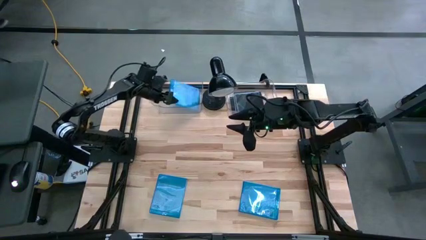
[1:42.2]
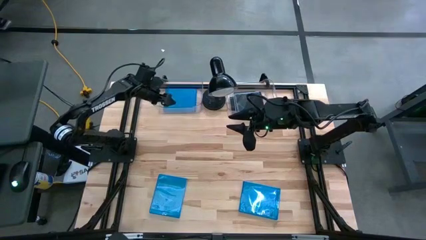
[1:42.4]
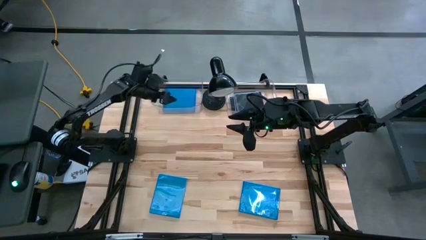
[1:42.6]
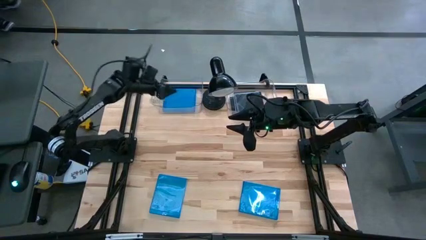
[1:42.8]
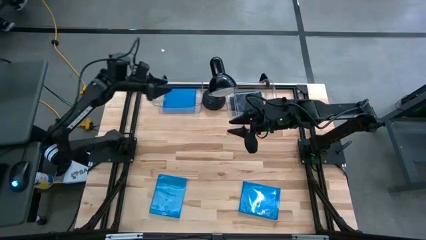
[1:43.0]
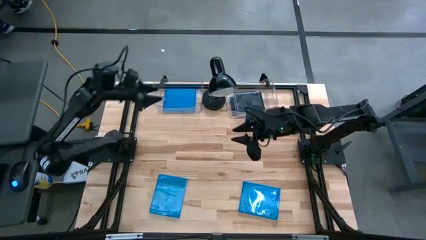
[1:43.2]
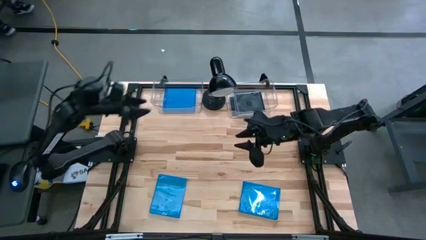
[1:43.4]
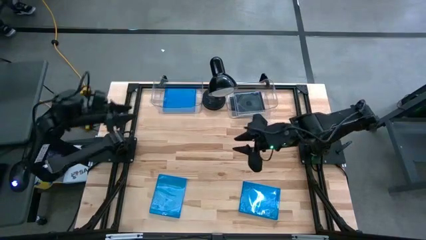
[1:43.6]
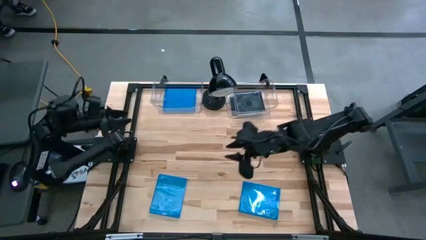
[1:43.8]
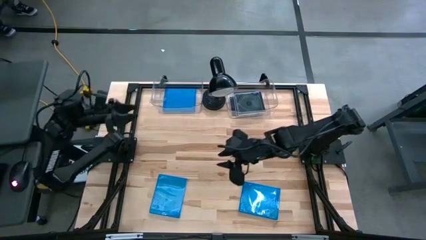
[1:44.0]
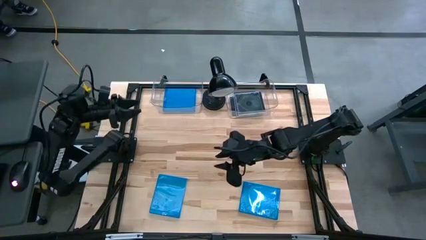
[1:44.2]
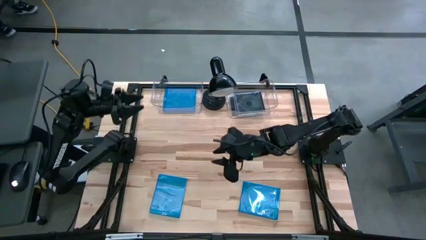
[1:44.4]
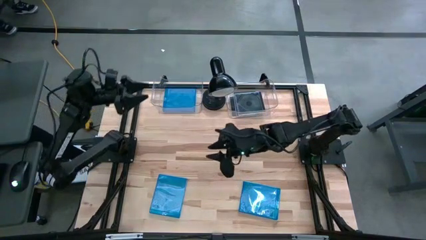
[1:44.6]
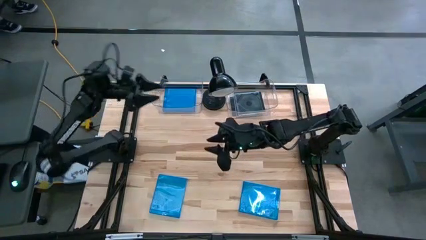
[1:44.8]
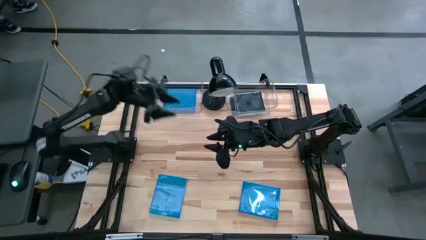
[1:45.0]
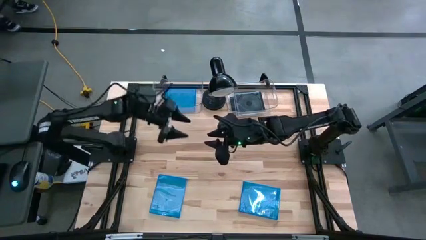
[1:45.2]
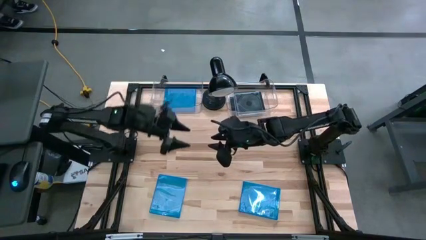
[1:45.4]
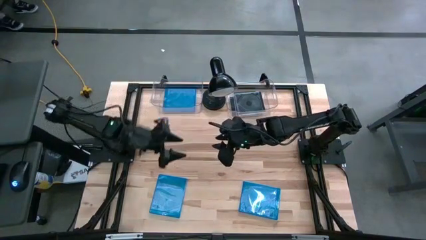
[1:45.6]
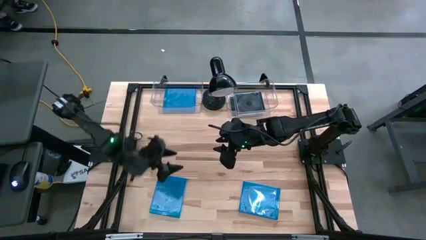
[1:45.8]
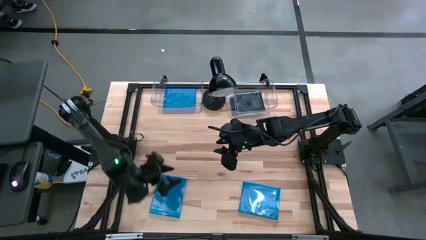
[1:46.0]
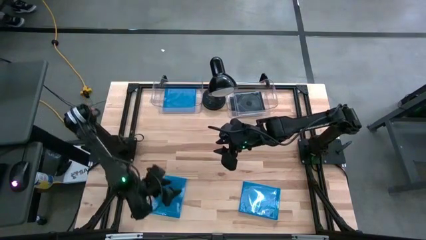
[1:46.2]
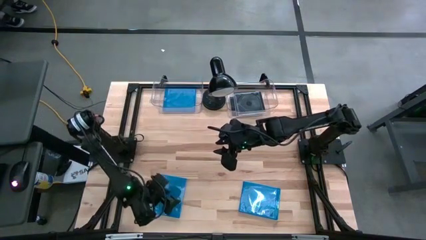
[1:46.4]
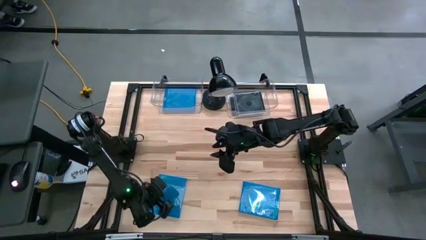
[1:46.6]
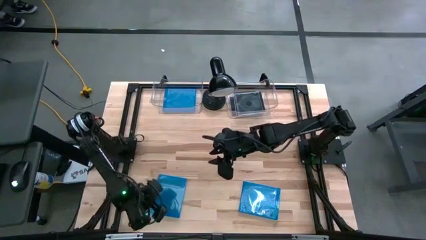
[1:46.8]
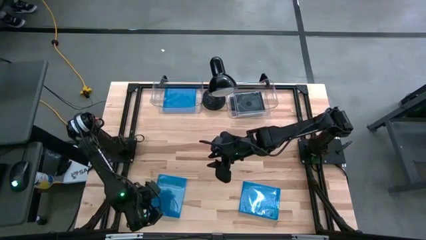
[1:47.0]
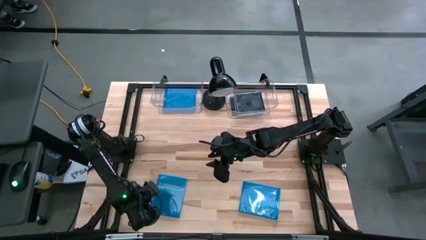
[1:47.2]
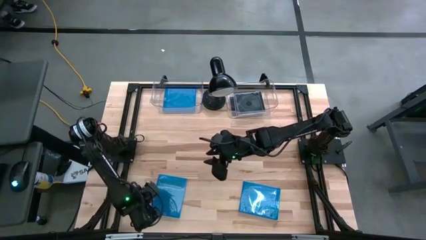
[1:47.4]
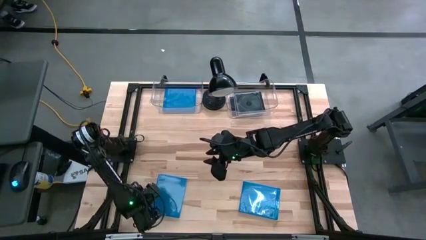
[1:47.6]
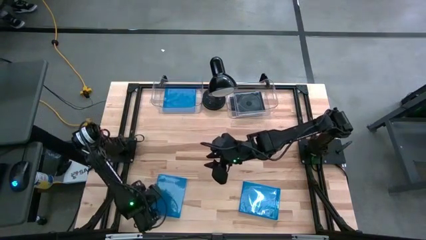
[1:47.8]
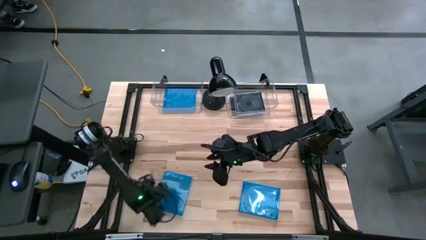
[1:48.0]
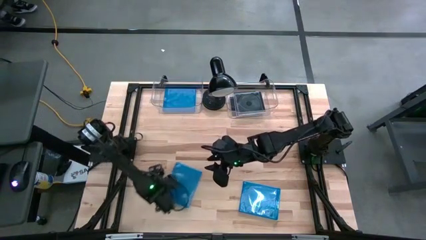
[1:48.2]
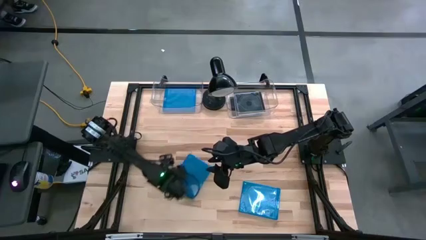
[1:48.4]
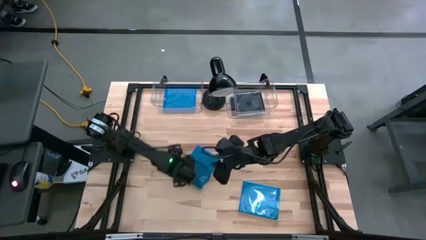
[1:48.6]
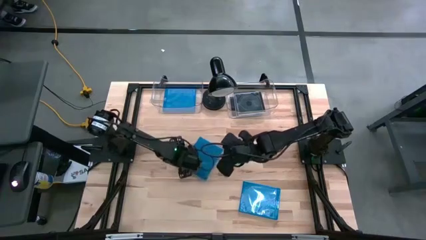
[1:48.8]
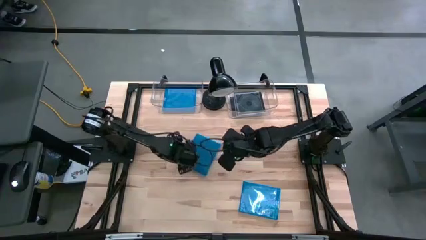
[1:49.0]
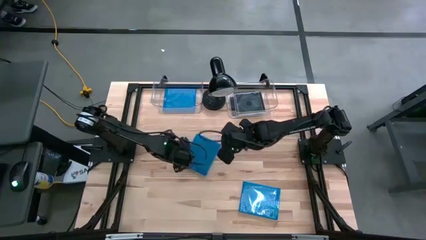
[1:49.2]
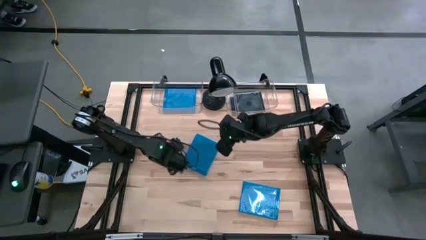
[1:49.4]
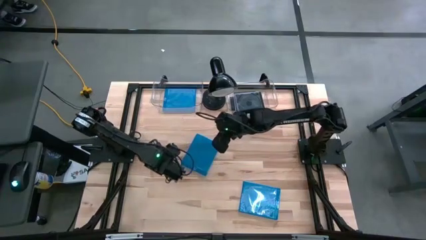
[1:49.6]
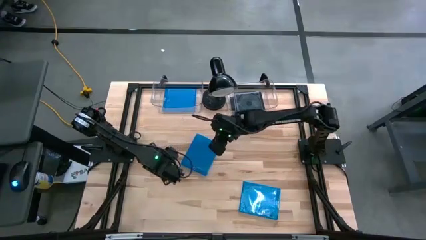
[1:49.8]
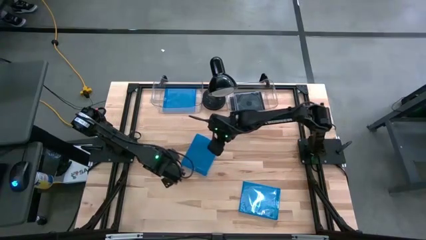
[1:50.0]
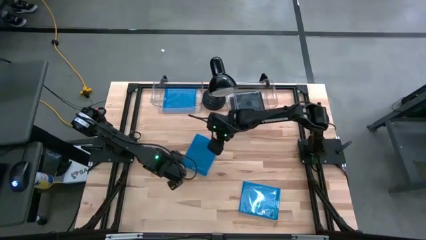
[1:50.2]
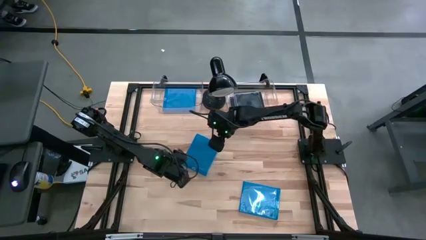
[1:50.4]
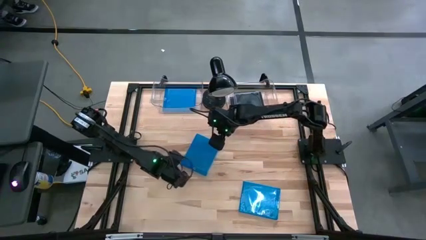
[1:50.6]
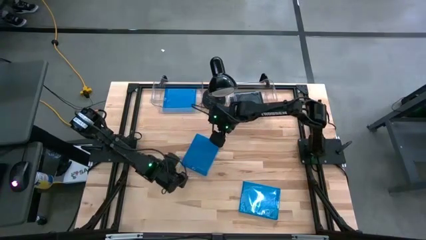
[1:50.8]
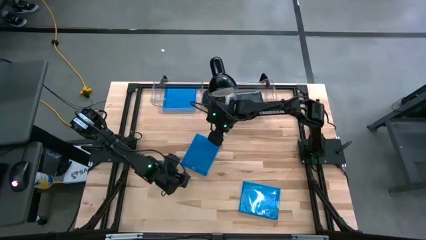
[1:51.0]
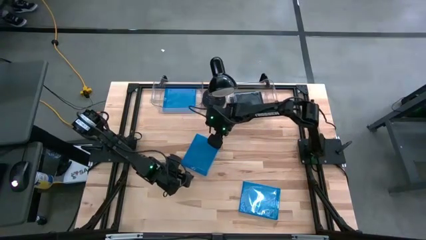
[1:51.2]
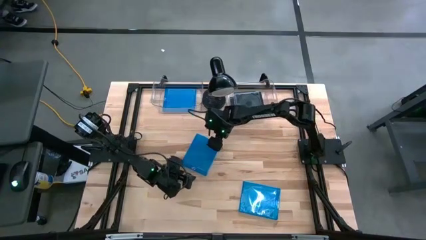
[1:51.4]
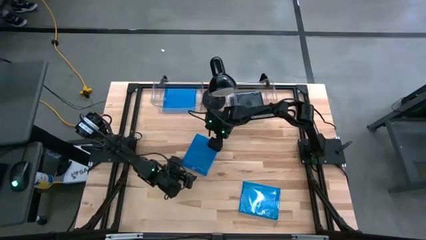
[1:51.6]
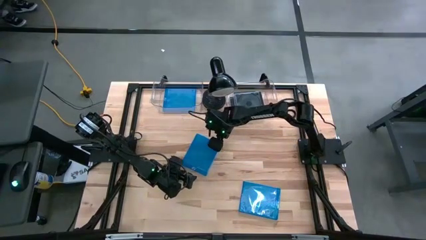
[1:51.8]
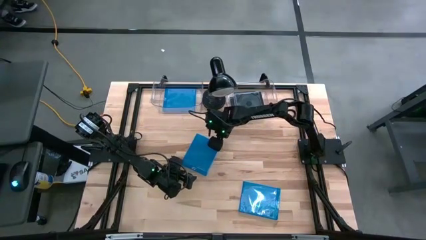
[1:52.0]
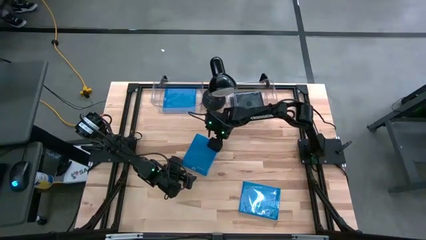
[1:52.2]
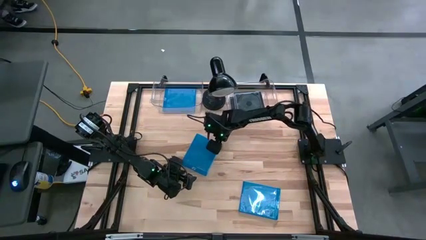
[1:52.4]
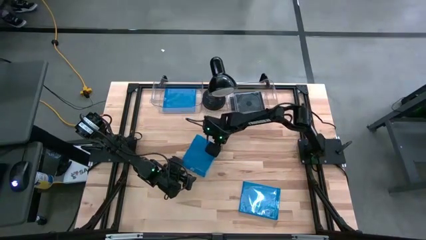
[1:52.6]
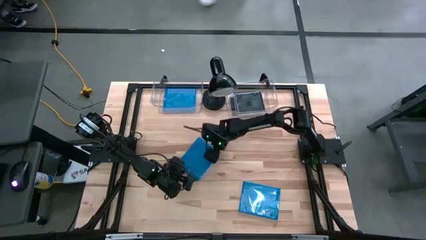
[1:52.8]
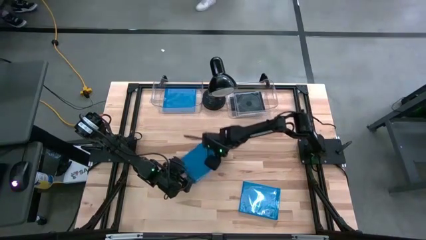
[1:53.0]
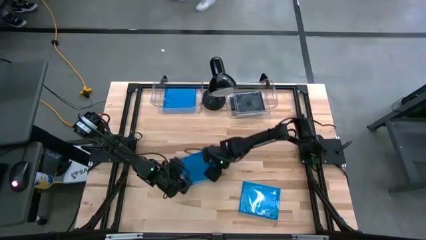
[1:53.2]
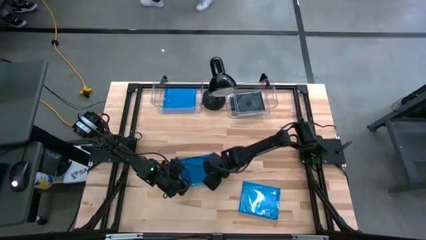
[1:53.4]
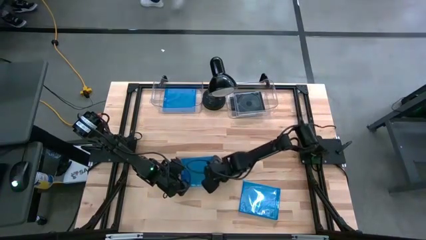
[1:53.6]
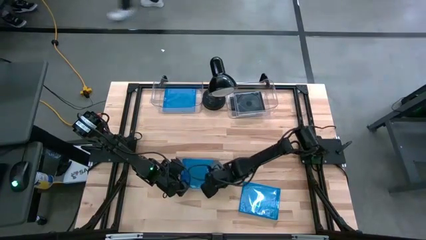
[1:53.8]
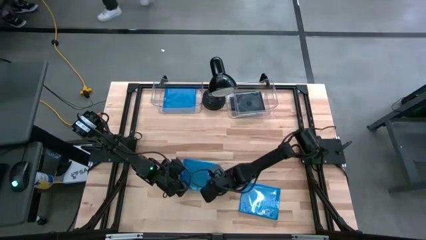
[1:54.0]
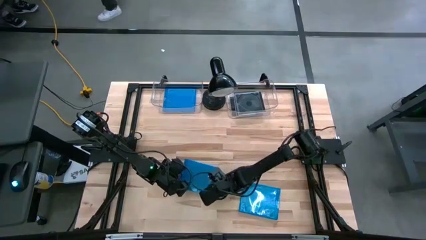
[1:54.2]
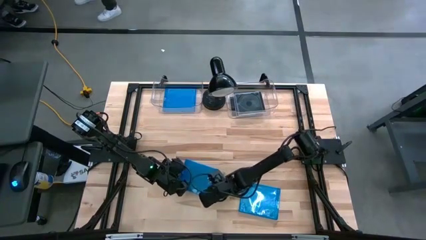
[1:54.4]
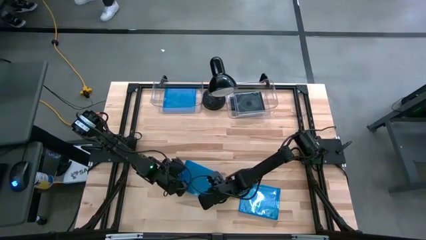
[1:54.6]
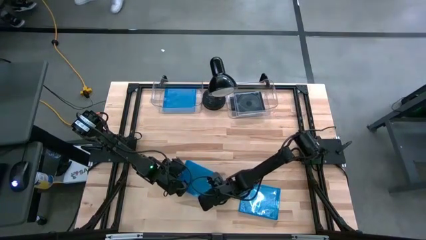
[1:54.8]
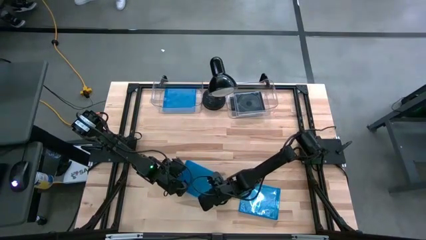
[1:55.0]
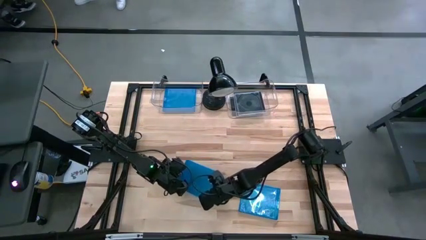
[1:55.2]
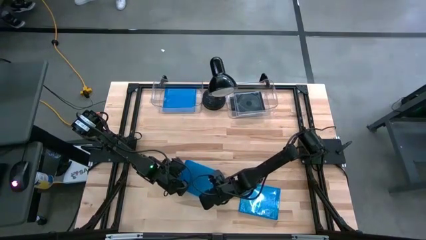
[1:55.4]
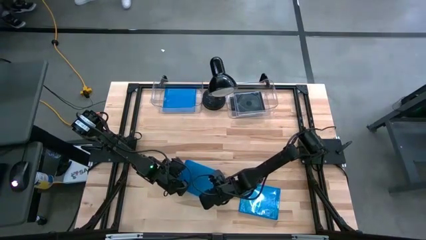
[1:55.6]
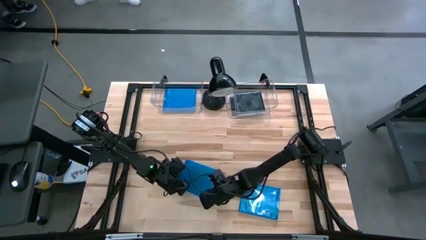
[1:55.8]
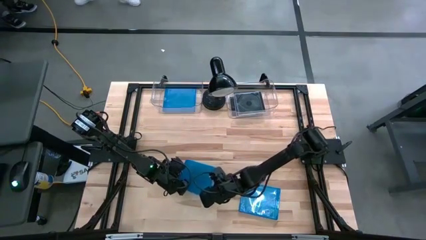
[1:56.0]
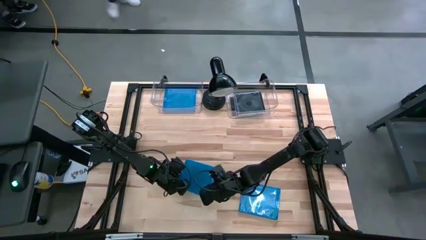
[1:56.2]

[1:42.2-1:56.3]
Task: Pick & place jewel cases by type
Put the left blue CD case into the left transparent bin

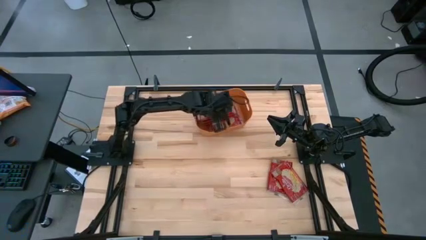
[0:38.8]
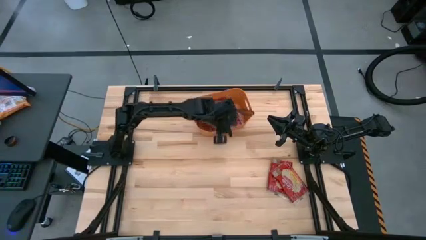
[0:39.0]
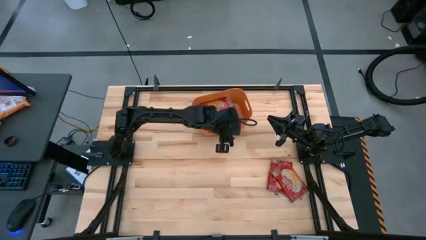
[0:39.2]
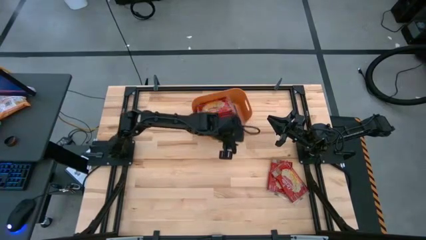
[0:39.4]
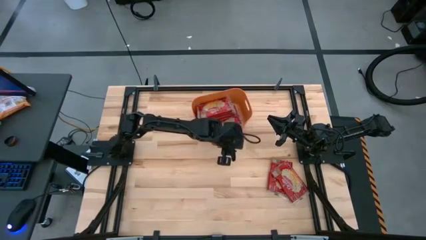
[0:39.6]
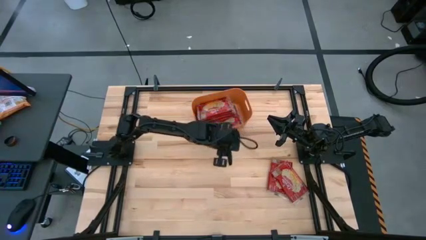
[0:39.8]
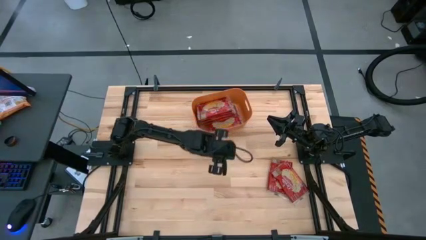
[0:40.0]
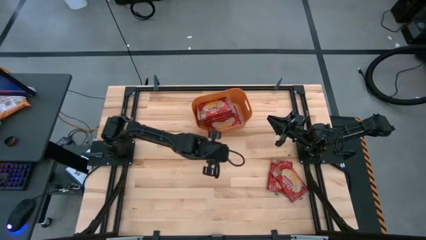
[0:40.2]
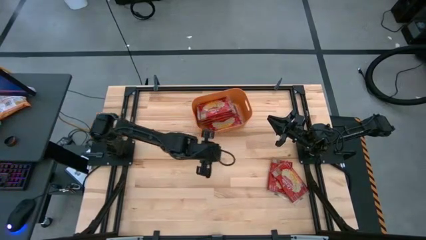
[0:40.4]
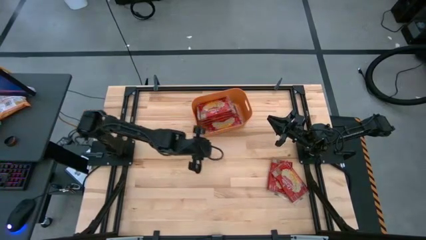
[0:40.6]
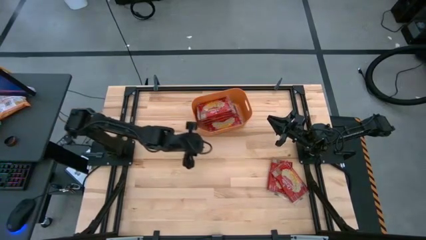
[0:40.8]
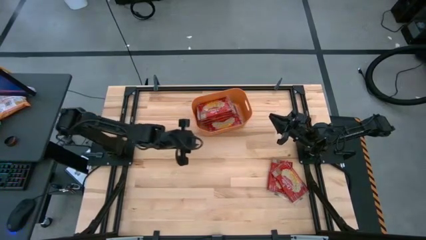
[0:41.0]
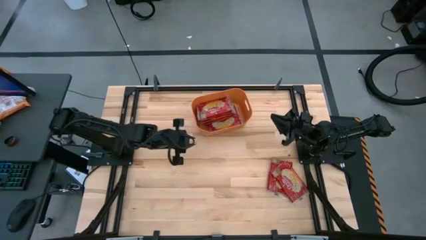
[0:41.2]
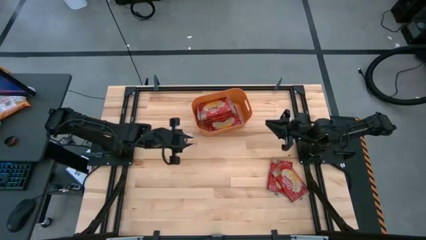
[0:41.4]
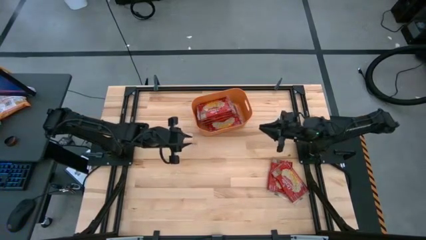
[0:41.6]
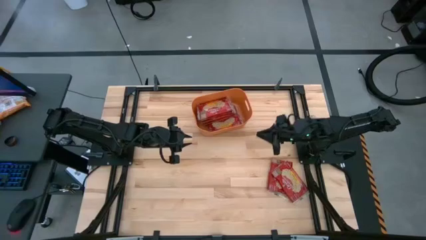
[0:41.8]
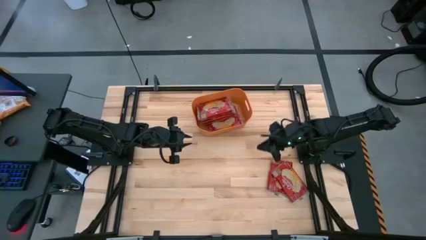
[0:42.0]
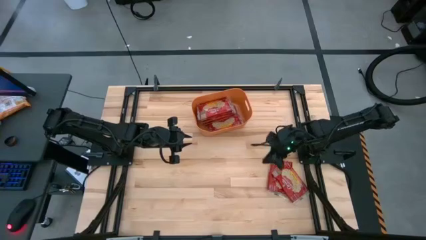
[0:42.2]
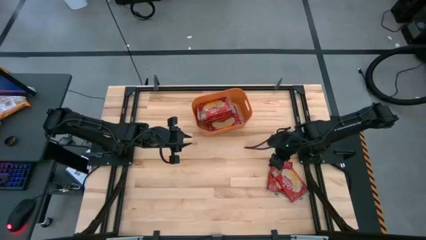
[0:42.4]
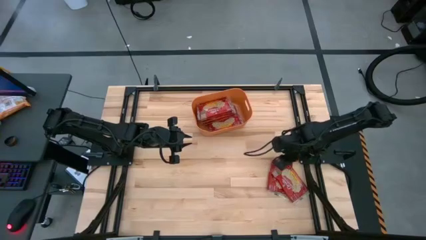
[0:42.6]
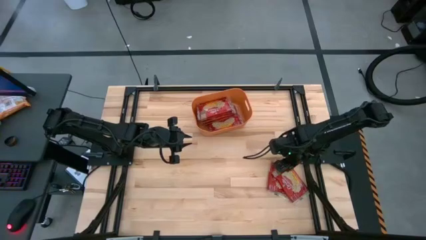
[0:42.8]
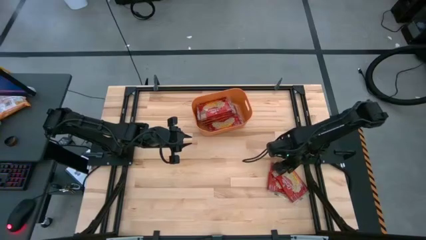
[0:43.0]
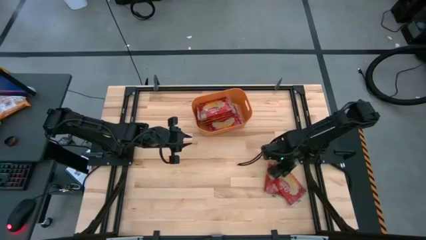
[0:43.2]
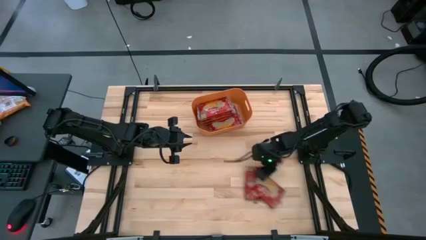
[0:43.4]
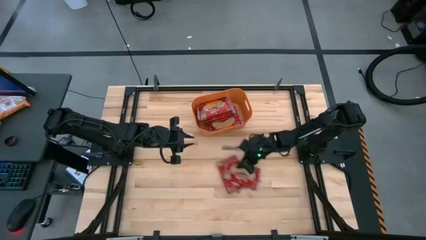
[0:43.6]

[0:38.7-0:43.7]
Task: Sort popcorn bags into baskets
Move the red popcorn bags to the middle of the table
